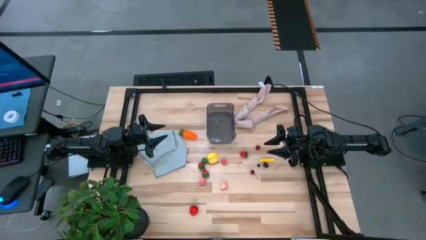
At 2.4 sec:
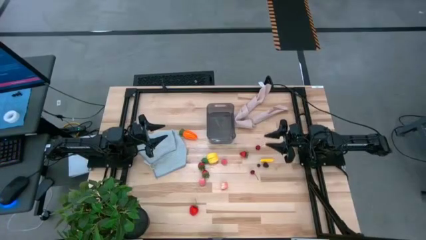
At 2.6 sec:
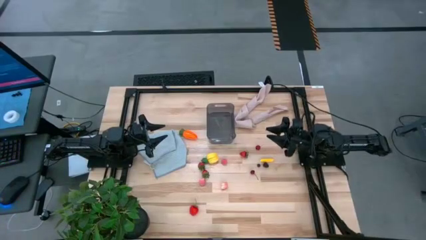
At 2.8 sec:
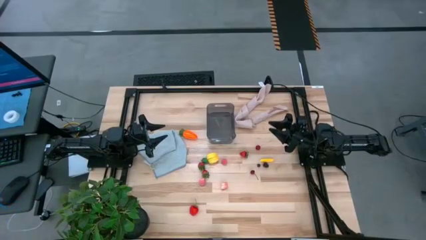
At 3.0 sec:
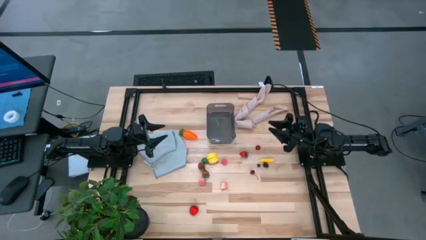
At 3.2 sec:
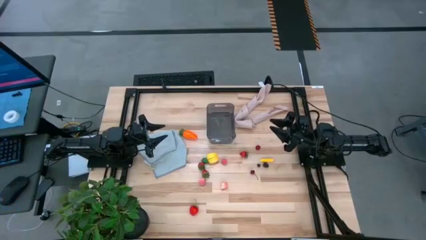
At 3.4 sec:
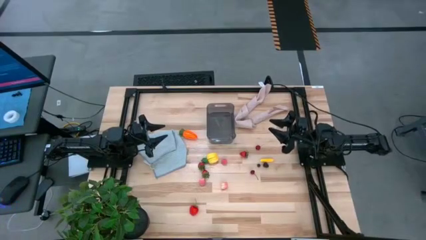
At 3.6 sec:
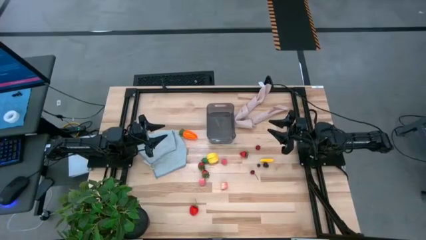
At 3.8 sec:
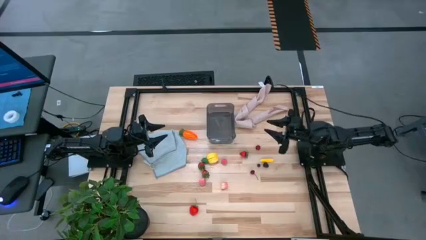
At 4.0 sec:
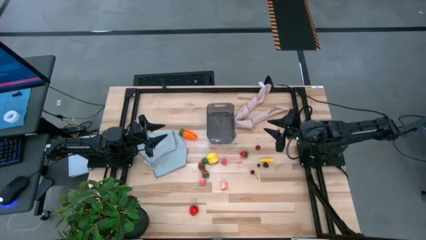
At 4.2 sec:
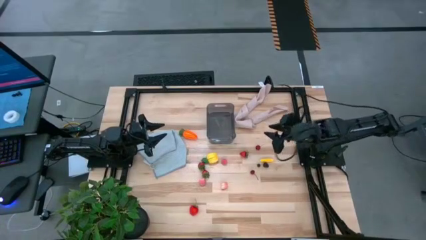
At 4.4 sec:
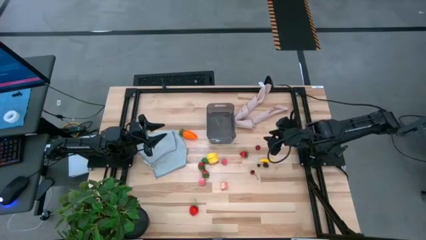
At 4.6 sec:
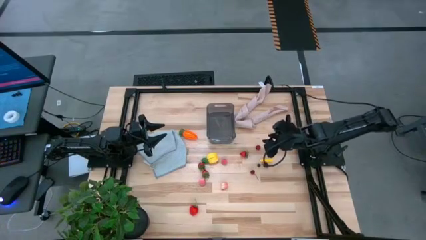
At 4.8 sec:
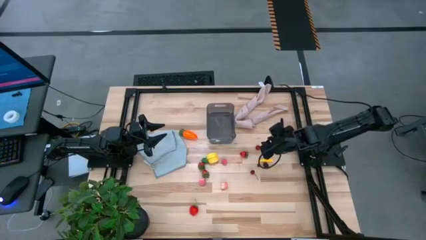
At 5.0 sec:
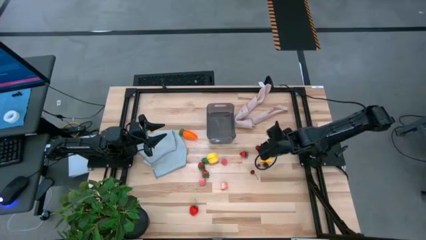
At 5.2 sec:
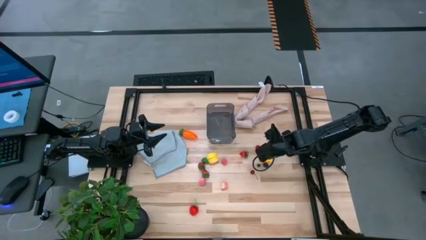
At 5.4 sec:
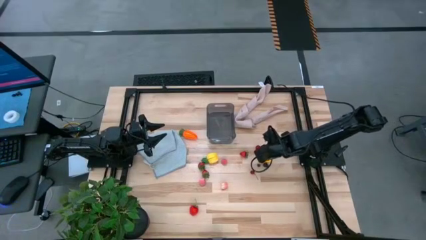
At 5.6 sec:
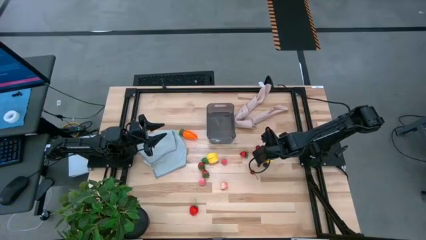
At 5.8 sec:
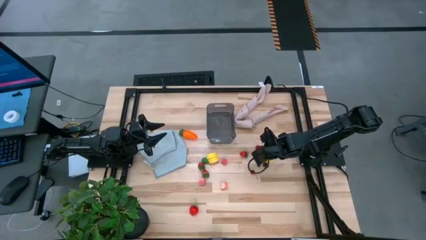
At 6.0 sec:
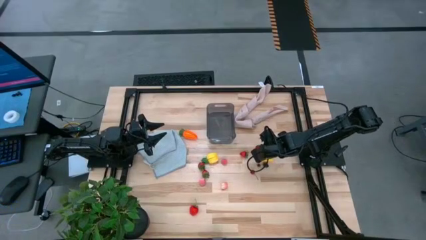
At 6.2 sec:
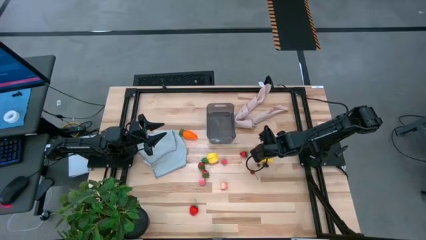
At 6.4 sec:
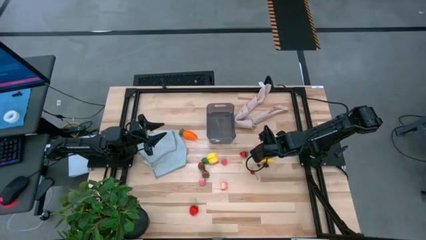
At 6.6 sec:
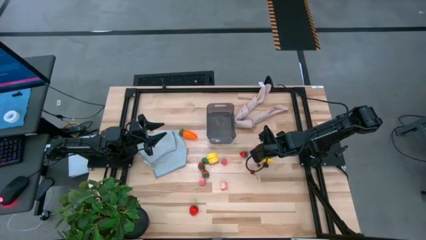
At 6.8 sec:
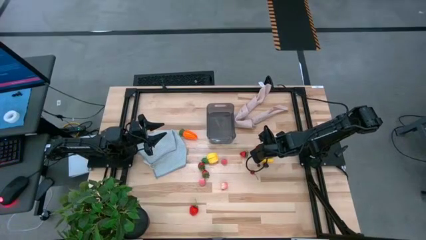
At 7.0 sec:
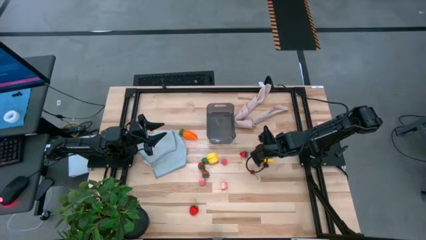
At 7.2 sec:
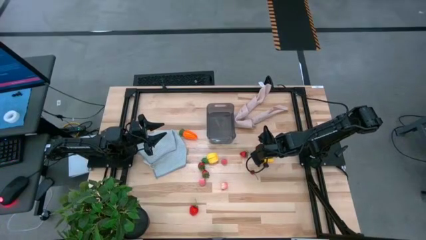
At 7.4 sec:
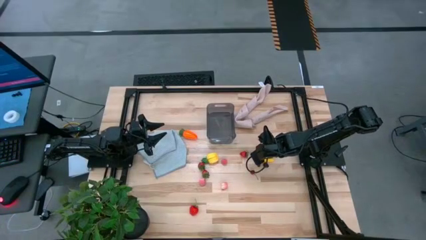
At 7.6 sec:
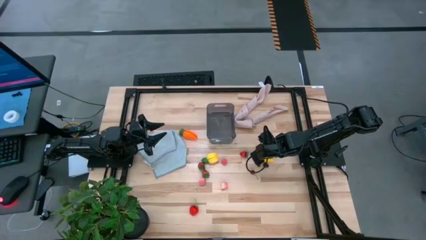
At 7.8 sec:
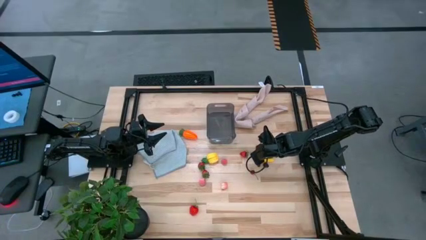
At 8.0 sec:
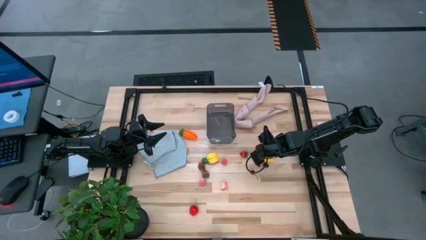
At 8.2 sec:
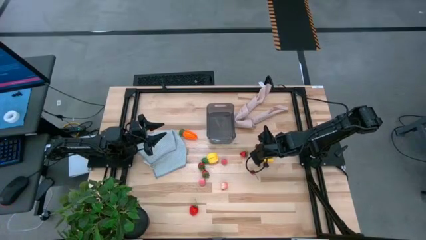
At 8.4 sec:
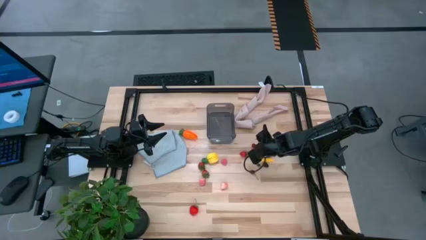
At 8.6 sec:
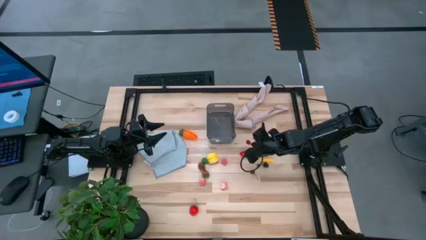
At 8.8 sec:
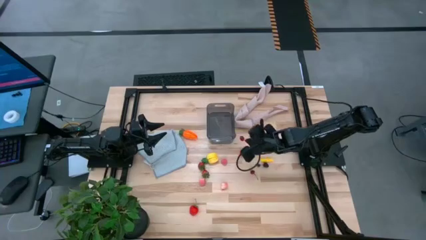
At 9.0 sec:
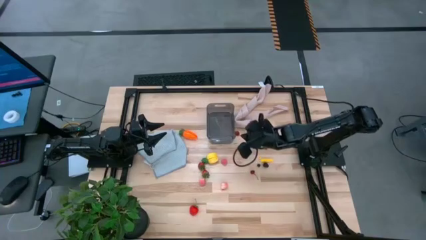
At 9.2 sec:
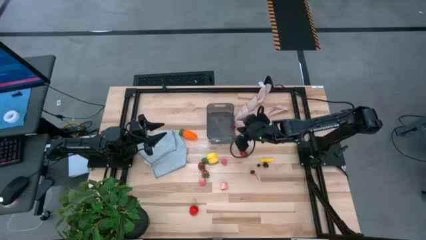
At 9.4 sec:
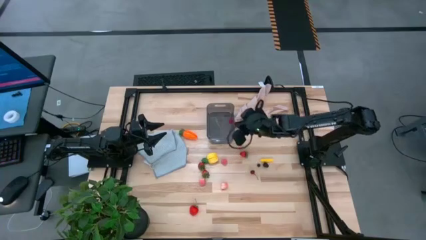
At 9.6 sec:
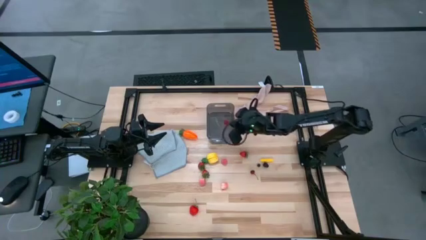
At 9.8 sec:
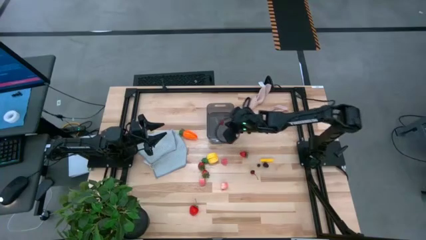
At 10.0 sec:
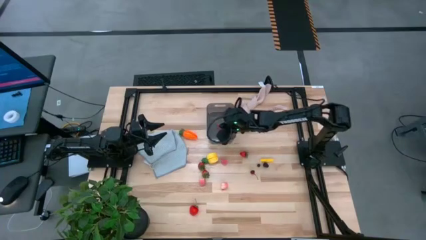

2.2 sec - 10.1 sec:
Task: Pick and placing Produce into tupperware
Put the red cherry into the black bin

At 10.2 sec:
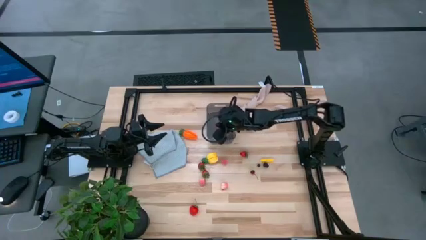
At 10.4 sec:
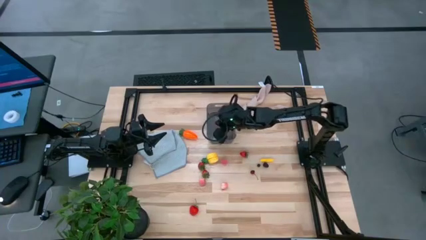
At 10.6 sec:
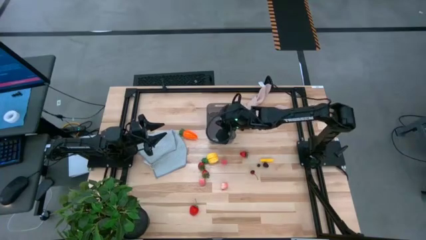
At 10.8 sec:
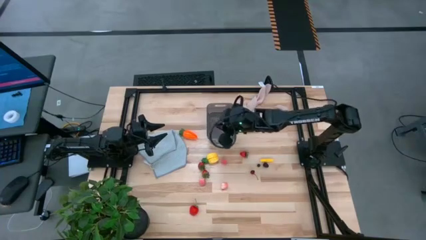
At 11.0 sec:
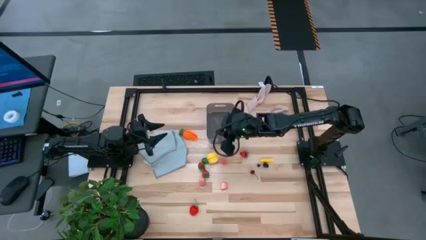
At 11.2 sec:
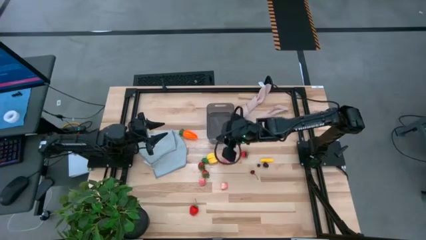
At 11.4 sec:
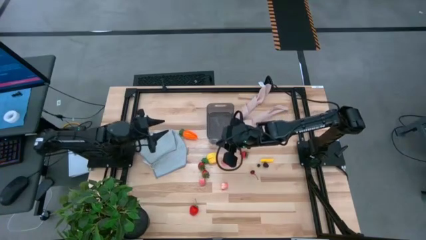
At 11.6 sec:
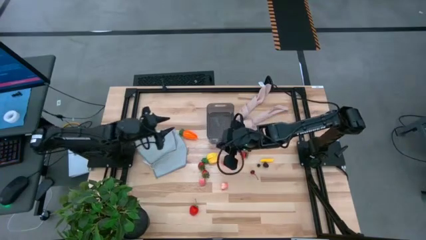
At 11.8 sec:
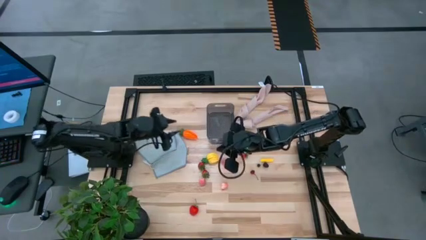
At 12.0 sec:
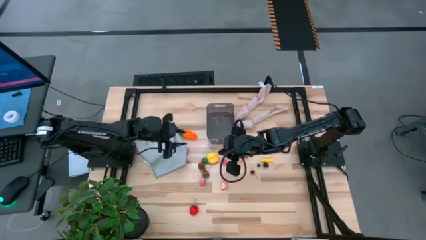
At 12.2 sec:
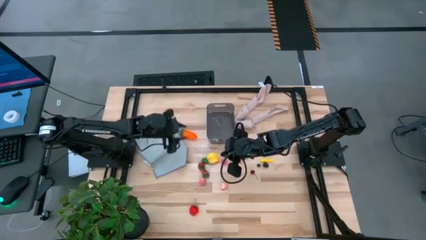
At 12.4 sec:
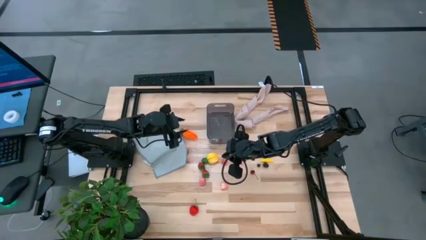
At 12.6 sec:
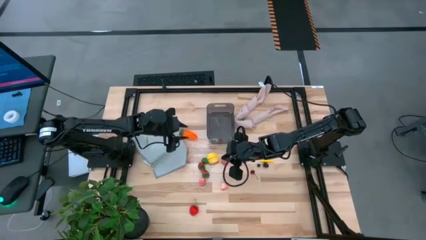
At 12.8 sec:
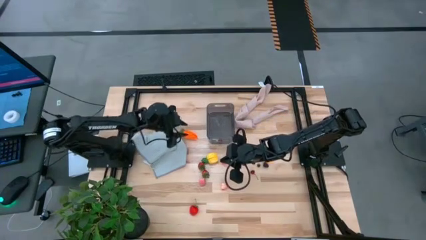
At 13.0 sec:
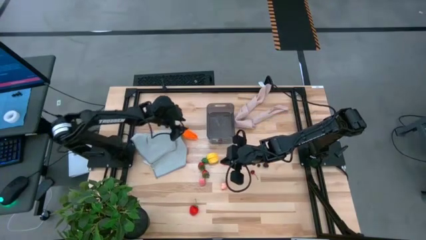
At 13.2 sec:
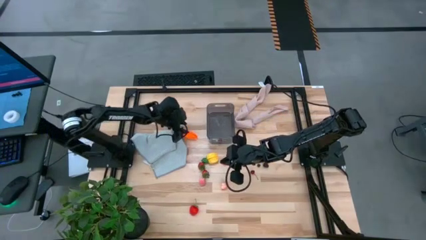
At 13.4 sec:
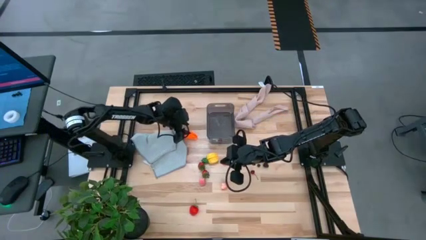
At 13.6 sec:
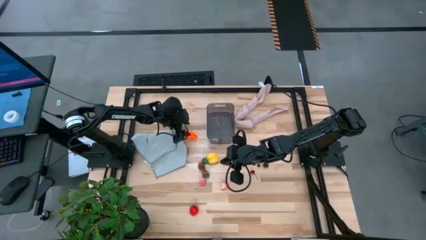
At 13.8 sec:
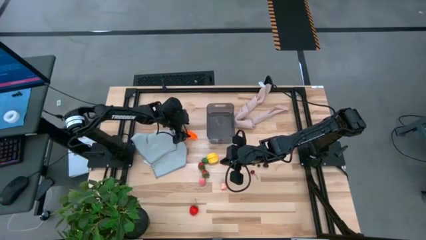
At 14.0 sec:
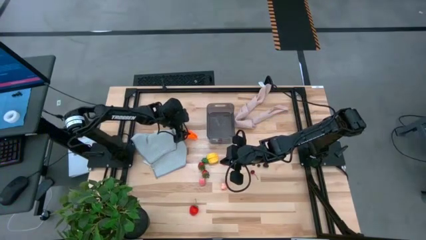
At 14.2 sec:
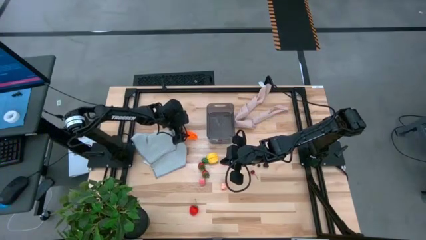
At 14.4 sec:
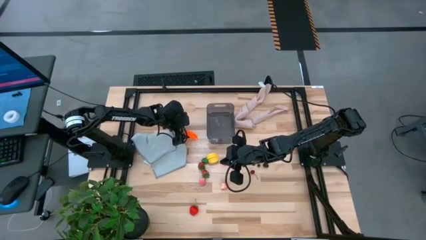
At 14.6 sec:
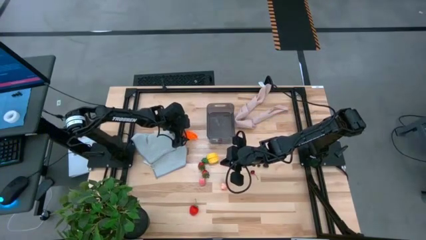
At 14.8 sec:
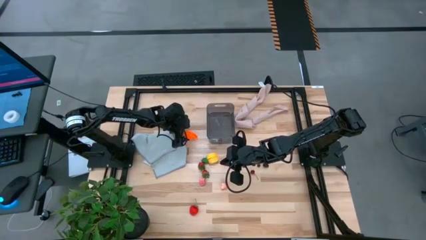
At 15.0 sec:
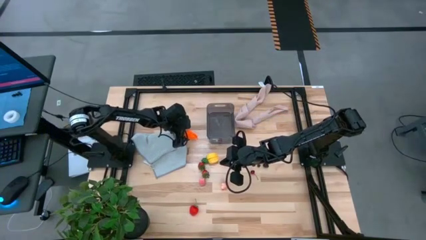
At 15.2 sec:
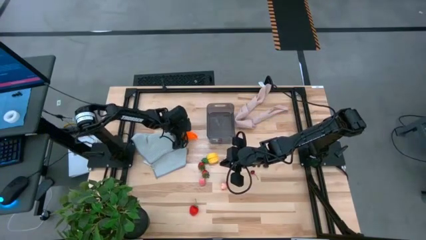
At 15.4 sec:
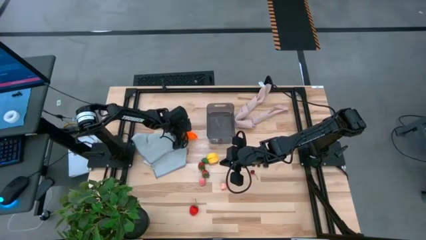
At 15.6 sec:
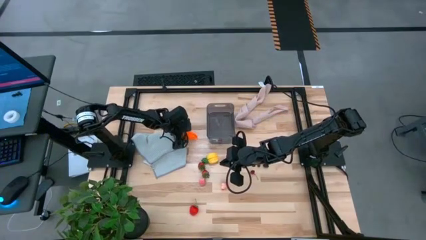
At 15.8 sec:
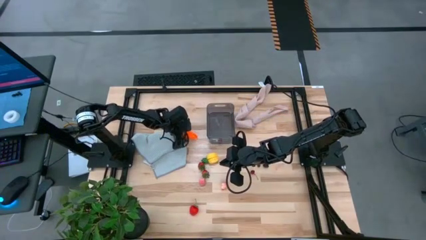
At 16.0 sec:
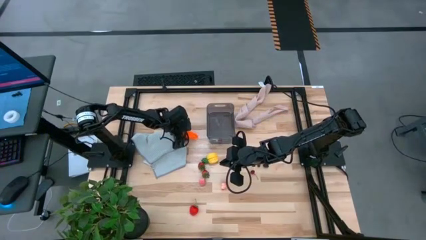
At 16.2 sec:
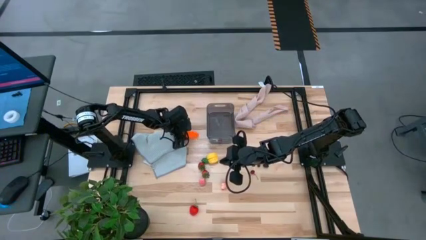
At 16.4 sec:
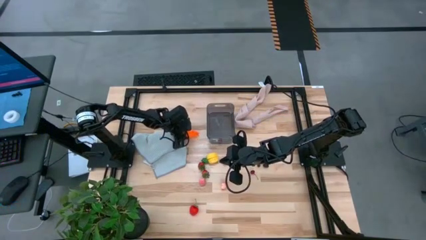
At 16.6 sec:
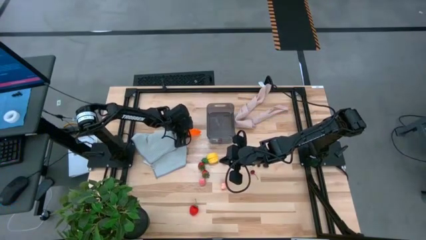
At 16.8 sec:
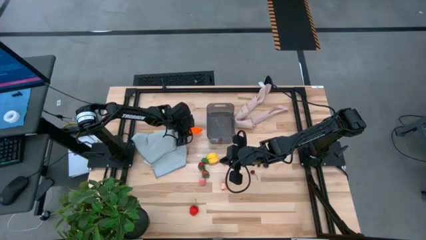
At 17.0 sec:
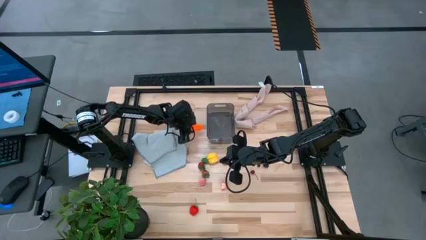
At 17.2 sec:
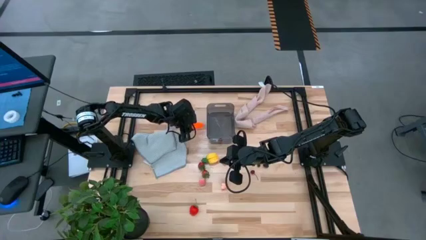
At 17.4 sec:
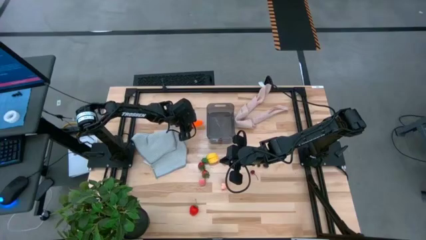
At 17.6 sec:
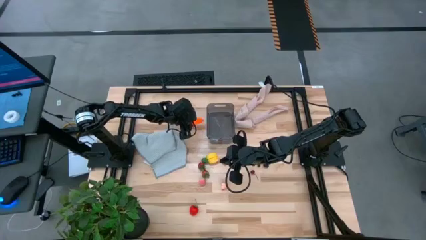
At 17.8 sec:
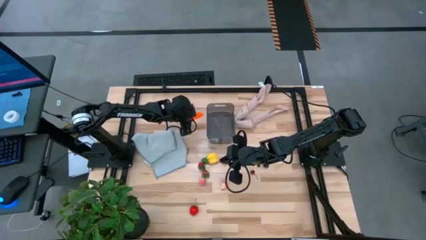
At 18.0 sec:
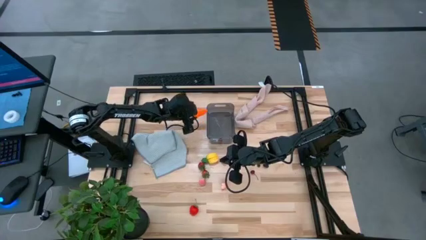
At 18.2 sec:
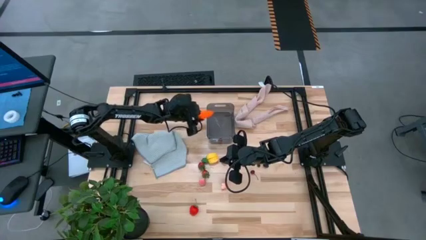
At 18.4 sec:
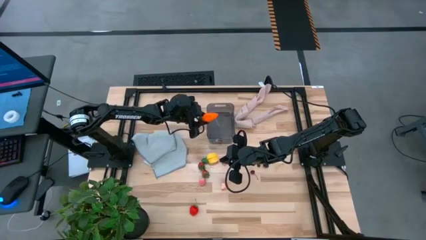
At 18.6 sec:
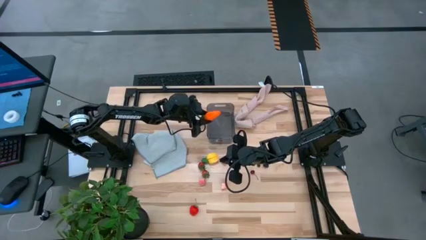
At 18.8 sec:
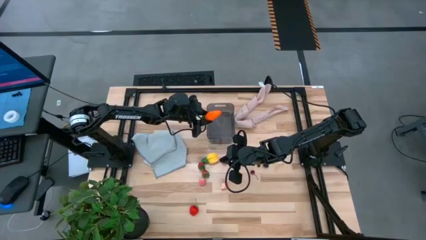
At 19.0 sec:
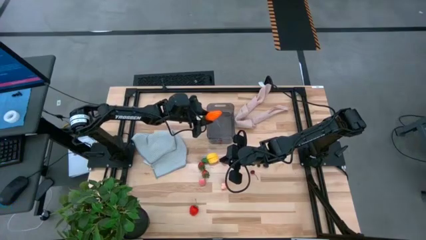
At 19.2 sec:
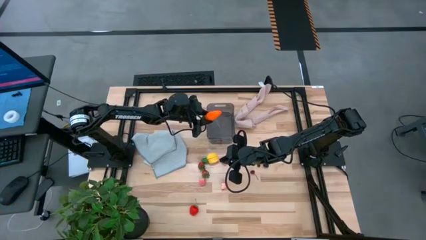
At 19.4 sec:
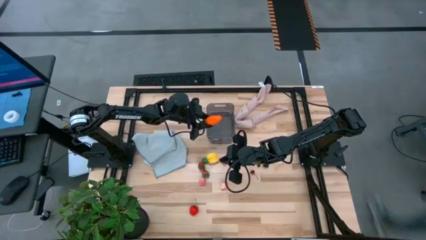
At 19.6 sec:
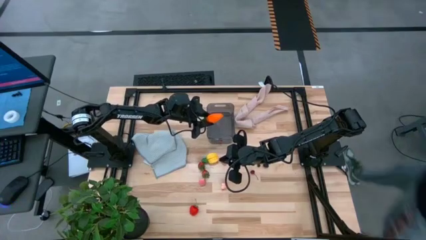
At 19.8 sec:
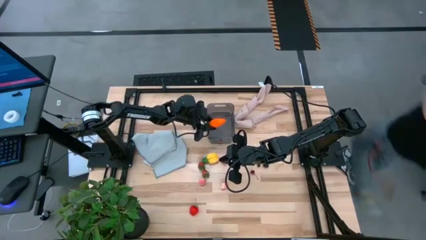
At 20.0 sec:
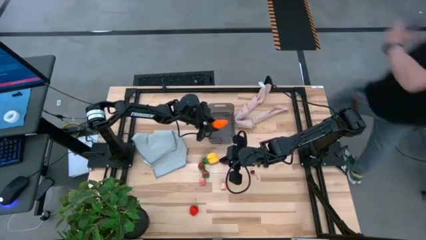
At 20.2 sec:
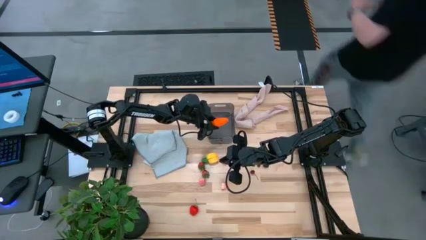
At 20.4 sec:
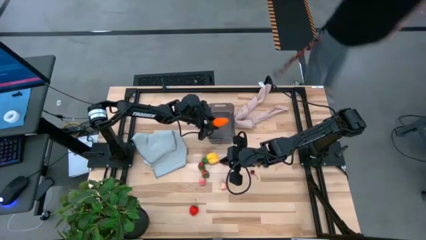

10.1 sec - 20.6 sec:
Put the orange carrot into the black bin
